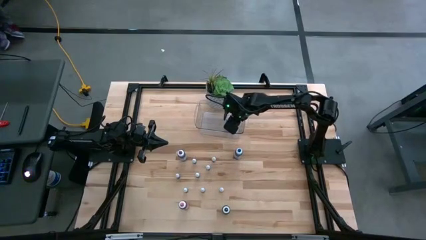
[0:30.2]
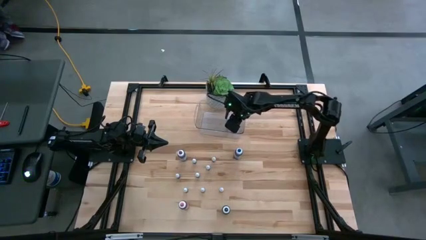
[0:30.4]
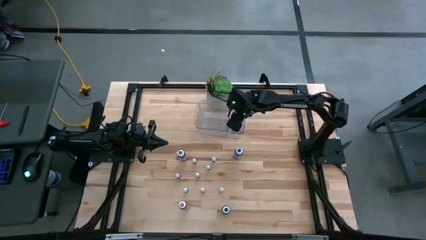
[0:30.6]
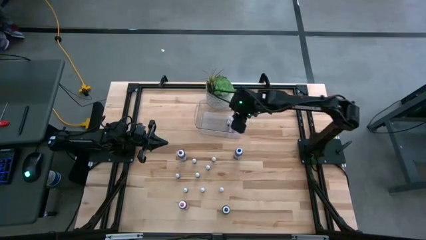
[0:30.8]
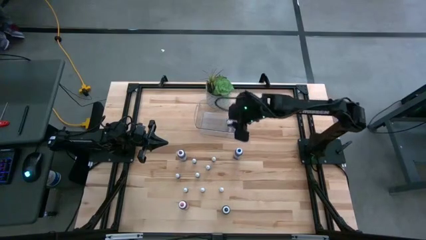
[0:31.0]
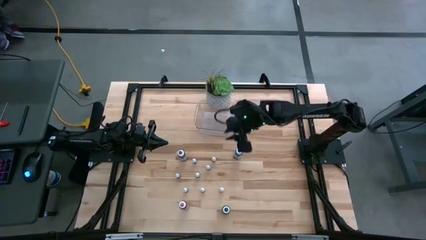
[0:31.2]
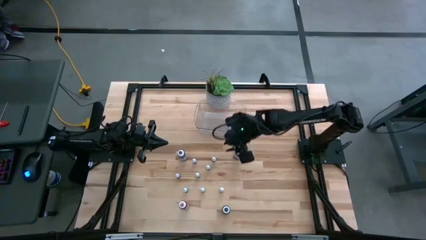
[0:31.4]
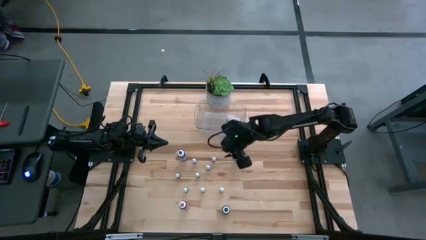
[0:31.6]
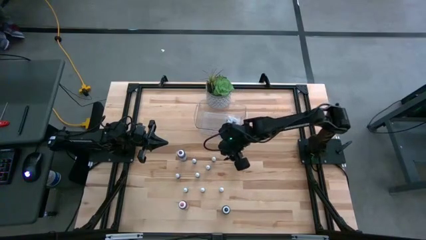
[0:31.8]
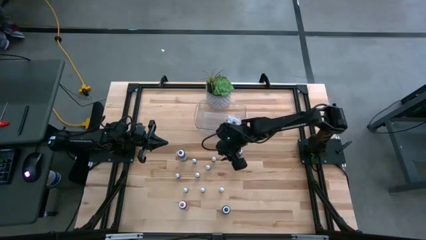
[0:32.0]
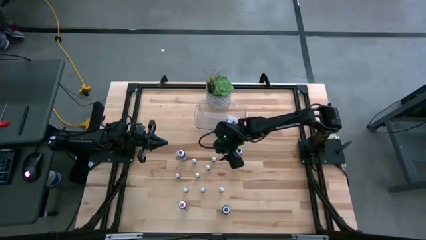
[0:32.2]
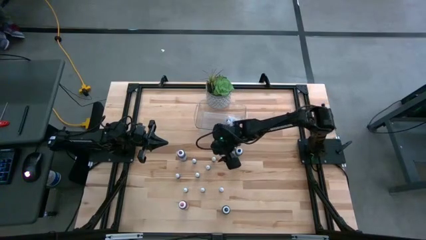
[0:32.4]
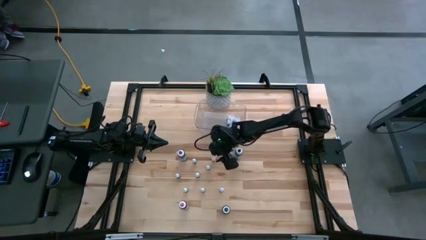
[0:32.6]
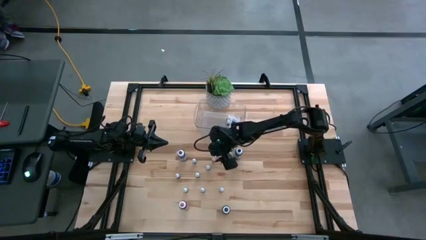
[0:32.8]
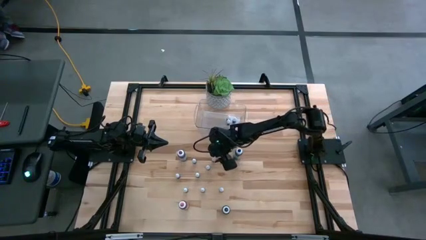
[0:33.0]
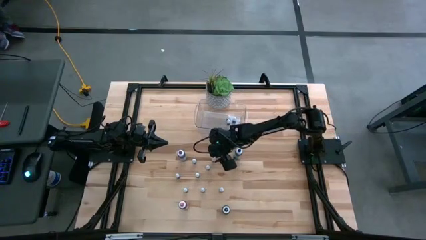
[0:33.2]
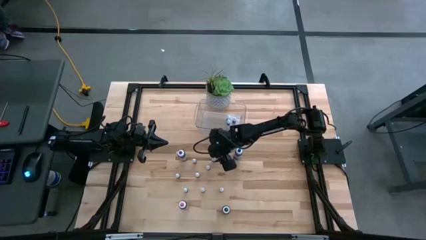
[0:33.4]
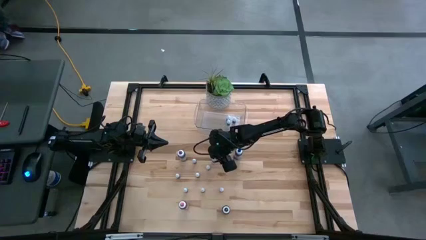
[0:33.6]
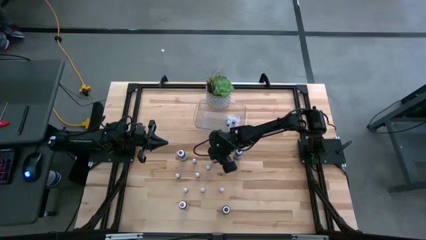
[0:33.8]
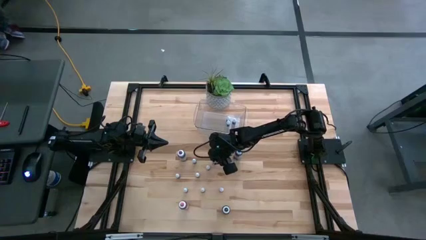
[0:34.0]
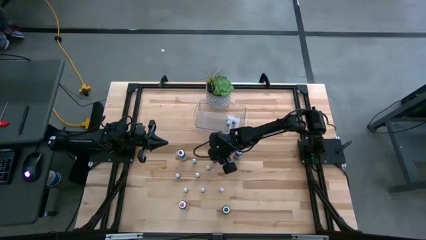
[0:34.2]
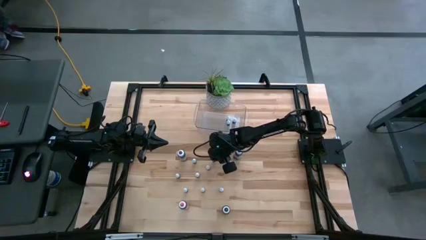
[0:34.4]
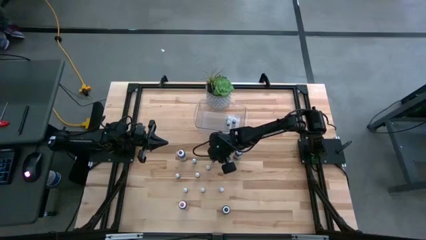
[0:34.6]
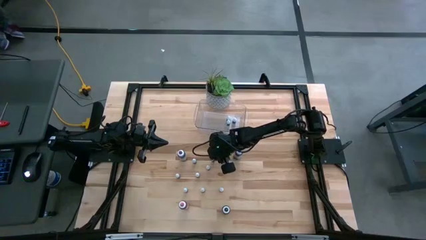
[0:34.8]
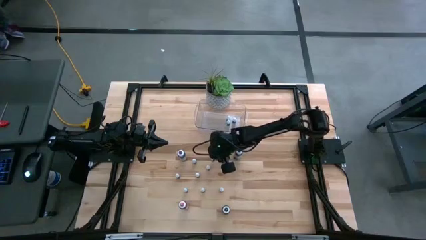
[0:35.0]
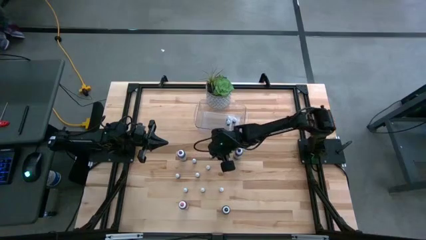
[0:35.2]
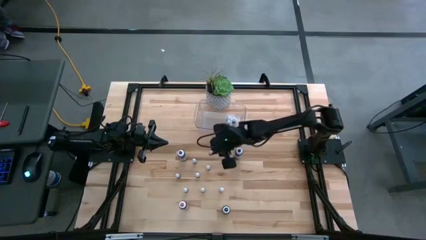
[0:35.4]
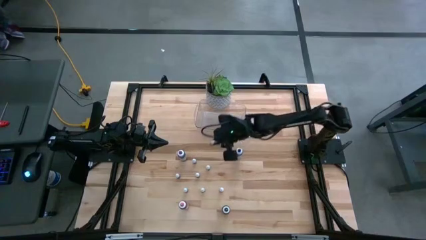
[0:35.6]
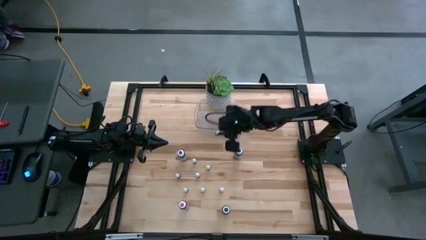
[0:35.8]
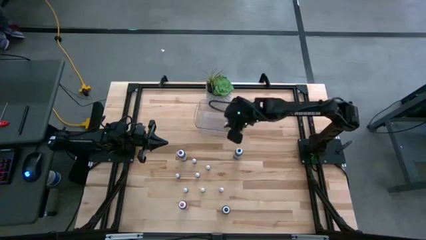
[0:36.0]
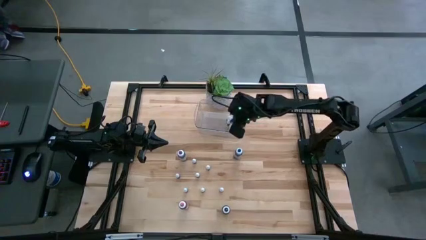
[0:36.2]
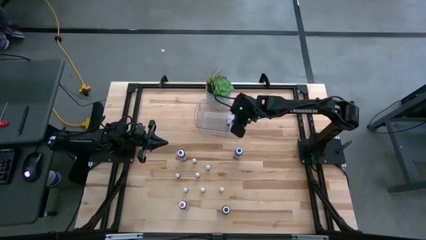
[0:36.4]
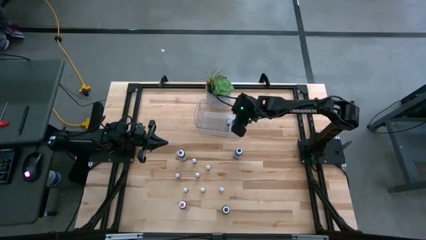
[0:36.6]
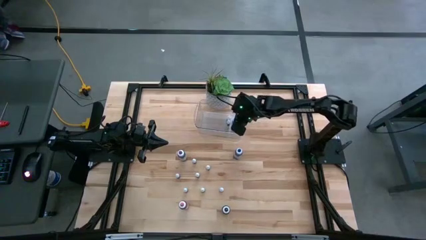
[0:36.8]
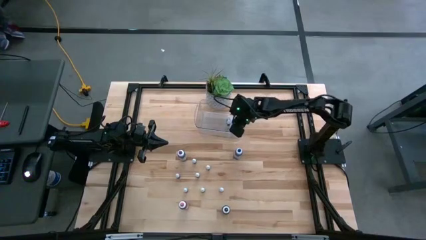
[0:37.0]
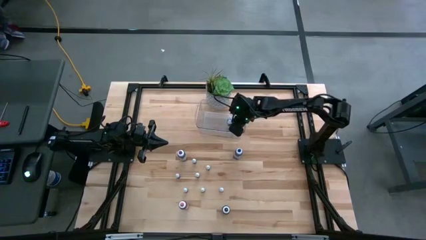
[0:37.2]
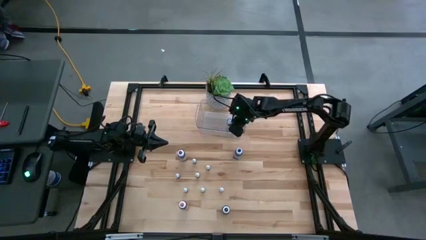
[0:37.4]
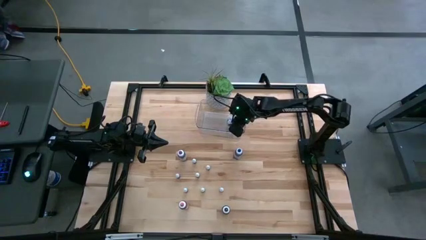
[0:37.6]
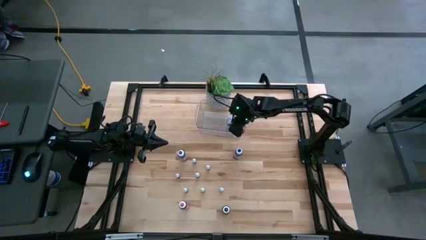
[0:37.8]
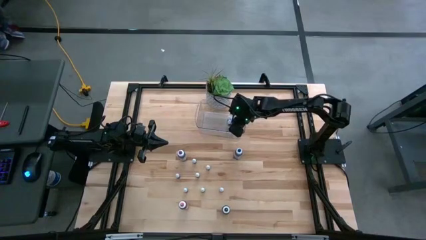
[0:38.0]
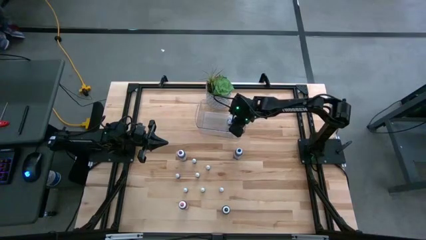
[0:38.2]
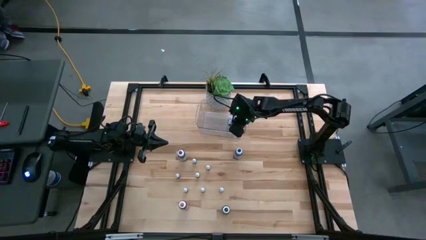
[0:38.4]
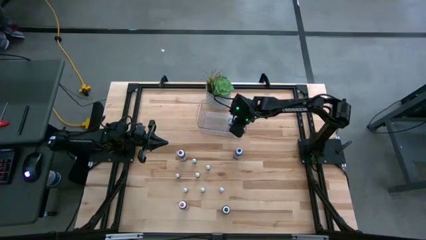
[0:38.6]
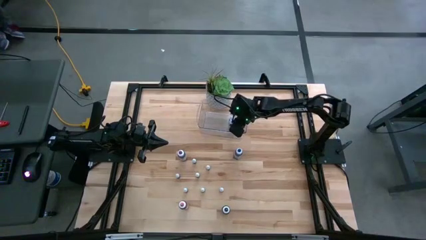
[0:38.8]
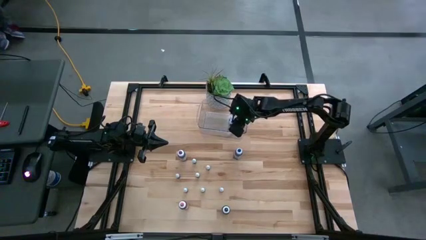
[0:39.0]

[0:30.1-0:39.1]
Task: Pick & Place food coloring
Put the small black food coloring bottle into the bin

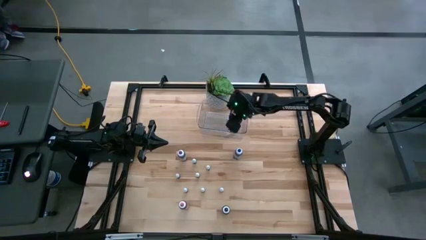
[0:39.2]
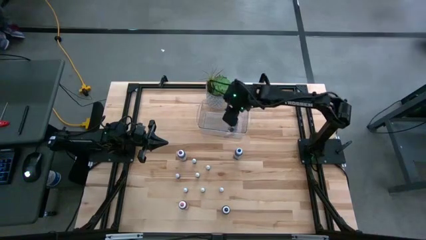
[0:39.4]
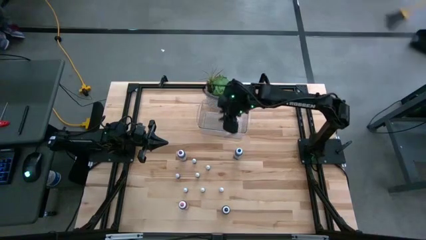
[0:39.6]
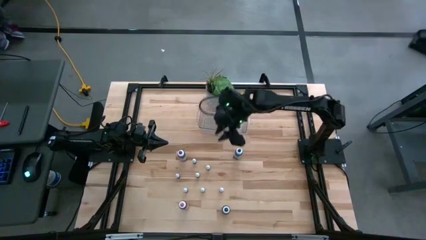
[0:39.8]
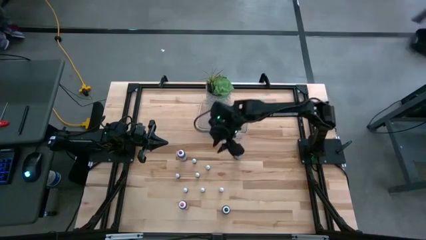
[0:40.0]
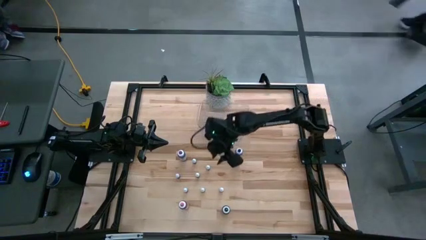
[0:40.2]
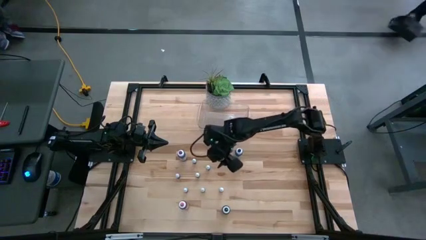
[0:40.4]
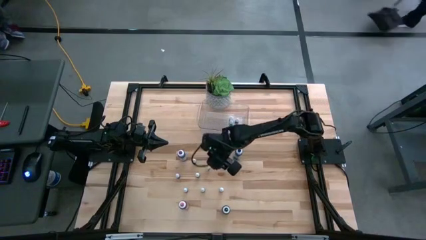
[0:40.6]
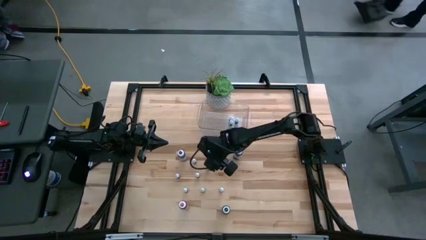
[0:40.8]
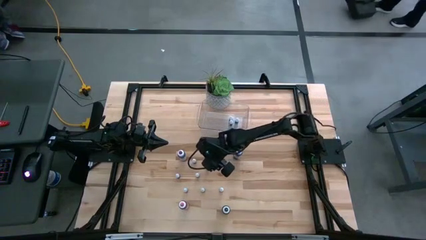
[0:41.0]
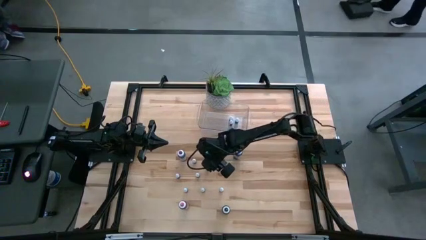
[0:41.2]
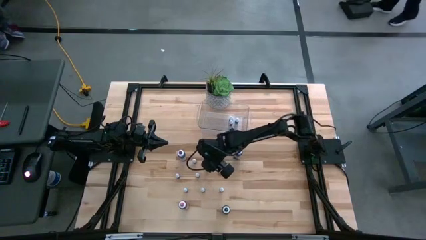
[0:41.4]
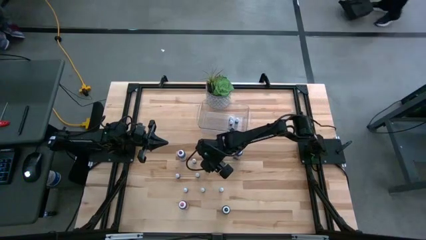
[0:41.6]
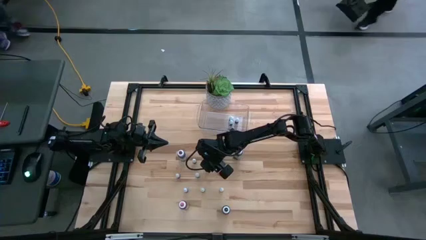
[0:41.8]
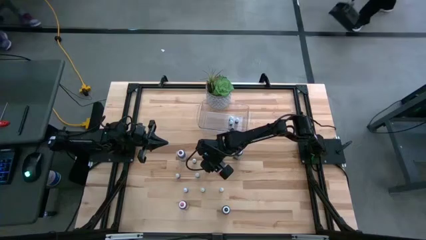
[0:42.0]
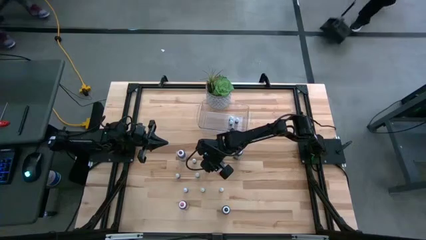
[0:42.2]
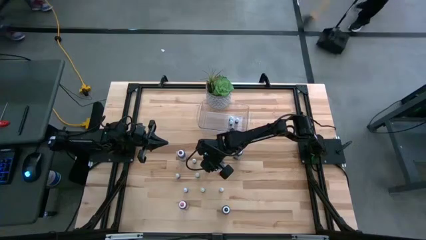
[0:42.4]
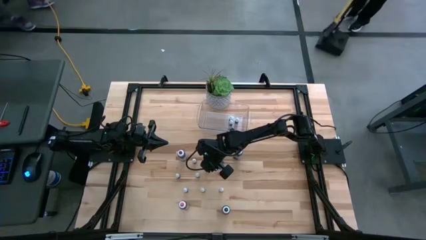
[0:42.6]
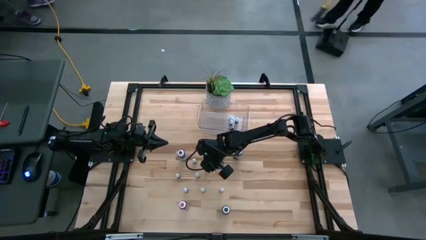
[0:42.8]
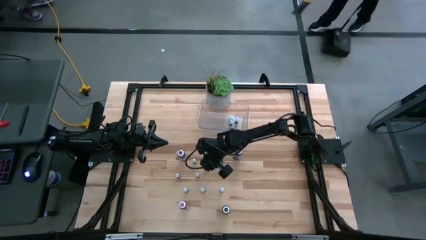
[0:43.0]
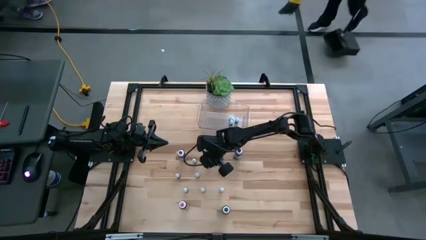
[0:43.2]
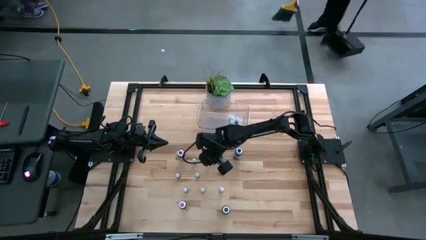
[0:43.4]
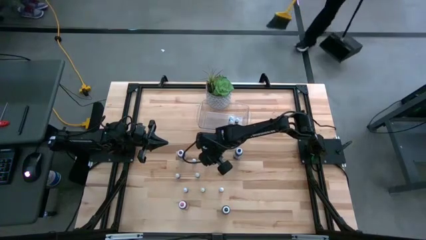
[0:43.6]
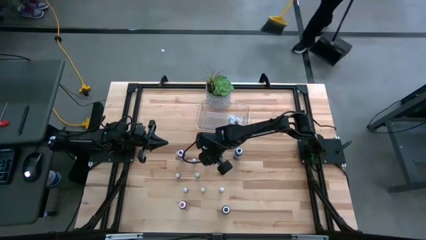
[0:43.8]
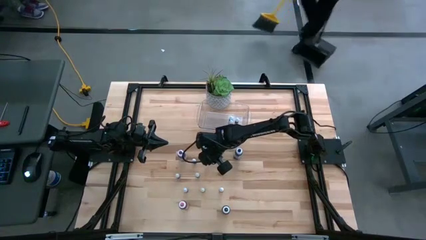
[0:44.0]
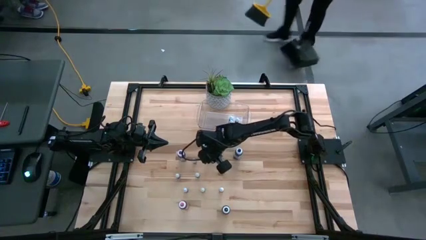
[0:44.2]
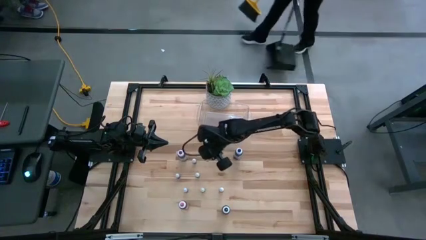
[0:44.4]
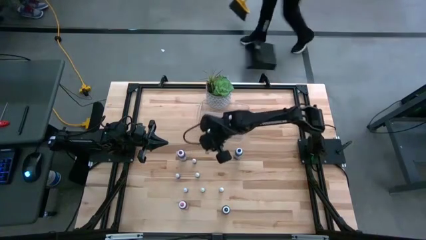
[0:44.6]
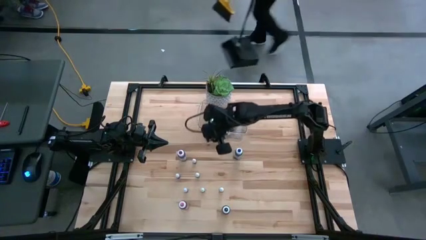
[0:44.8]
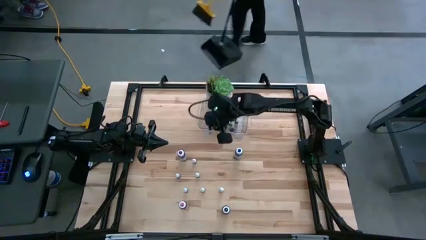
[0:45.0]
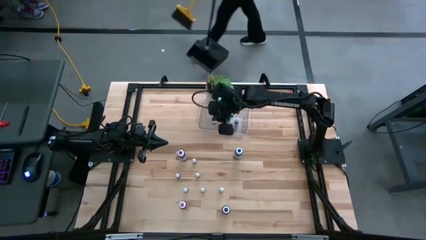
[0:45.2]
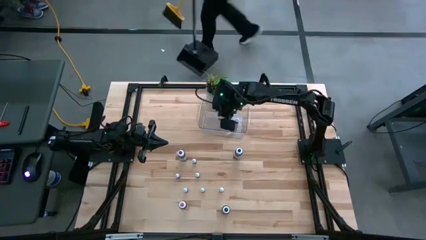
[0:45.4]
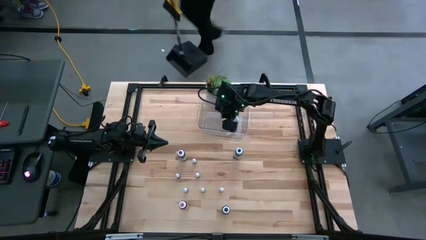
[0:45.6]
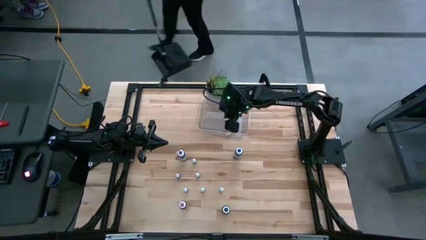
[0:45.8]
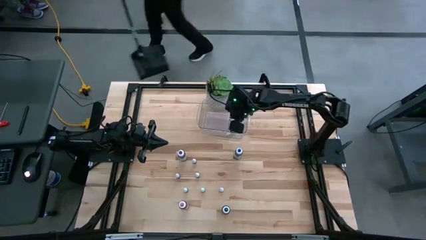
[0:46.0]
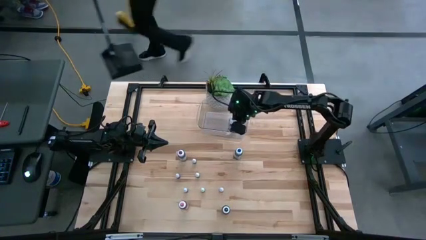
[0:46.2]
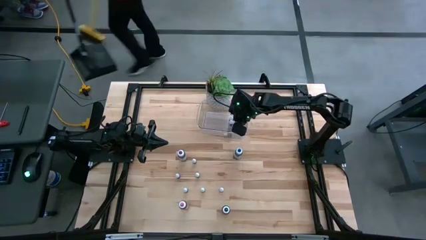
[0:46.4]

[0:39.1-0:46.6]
Put the small black food coloring bottle into the bin
